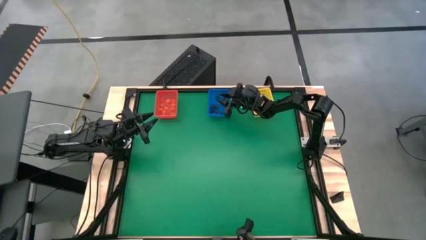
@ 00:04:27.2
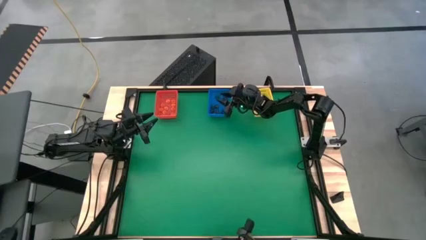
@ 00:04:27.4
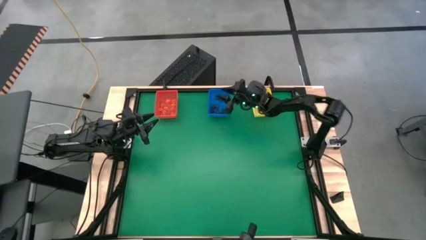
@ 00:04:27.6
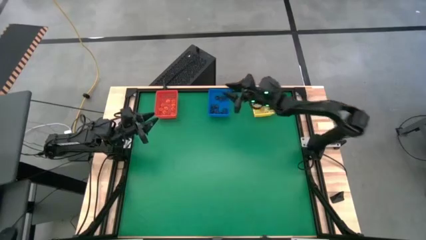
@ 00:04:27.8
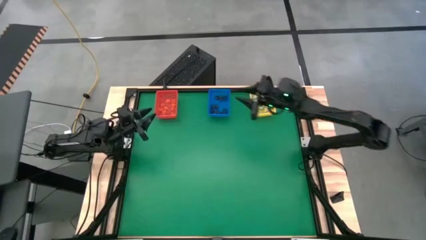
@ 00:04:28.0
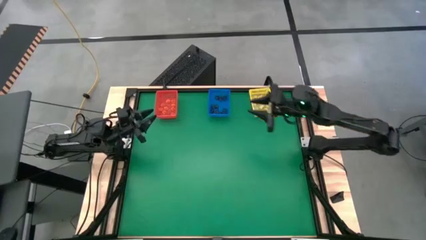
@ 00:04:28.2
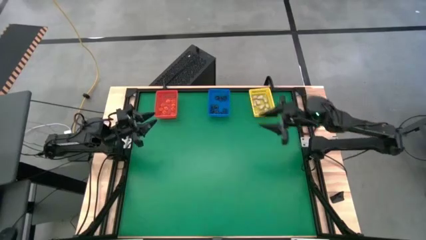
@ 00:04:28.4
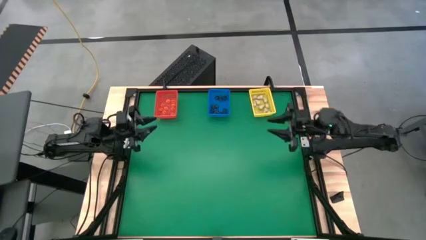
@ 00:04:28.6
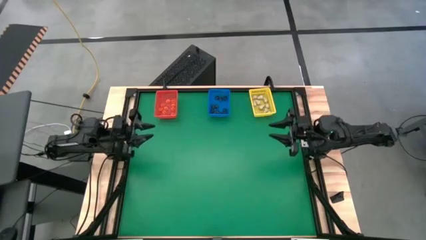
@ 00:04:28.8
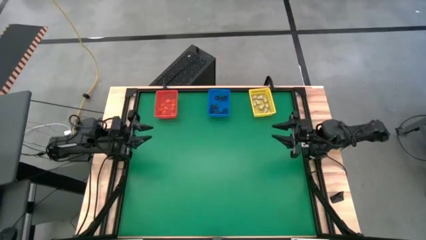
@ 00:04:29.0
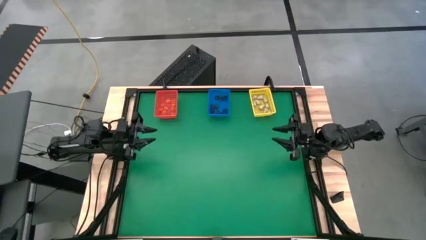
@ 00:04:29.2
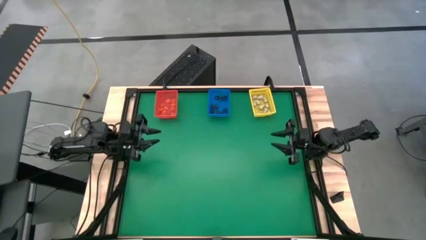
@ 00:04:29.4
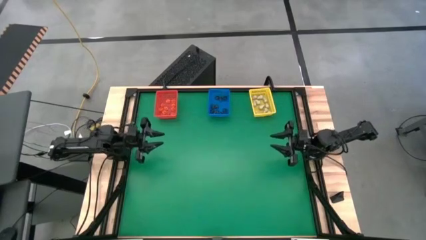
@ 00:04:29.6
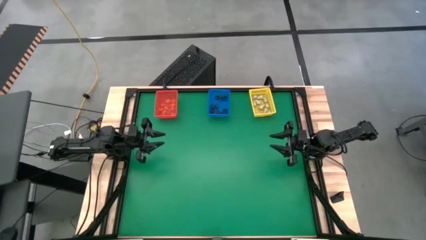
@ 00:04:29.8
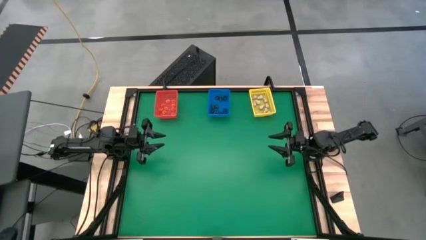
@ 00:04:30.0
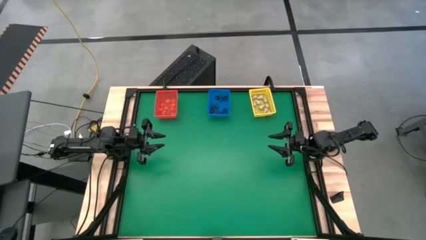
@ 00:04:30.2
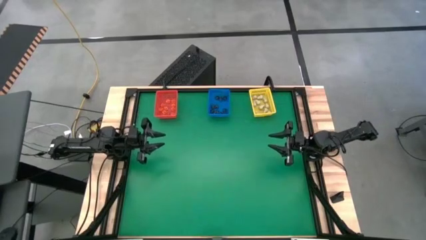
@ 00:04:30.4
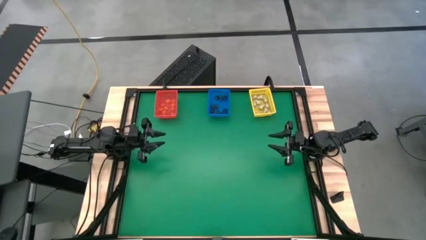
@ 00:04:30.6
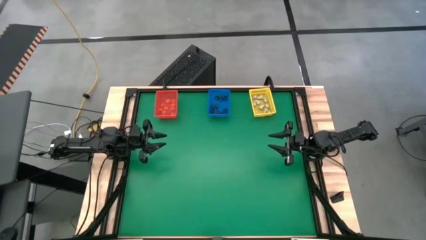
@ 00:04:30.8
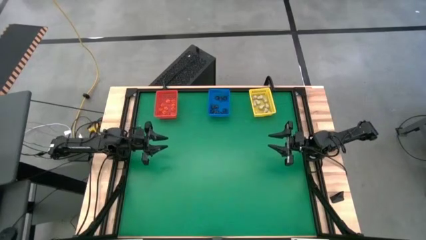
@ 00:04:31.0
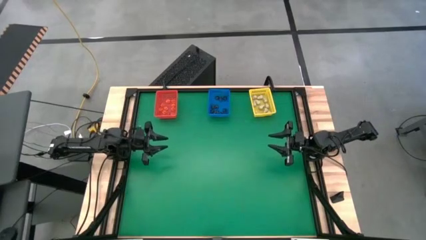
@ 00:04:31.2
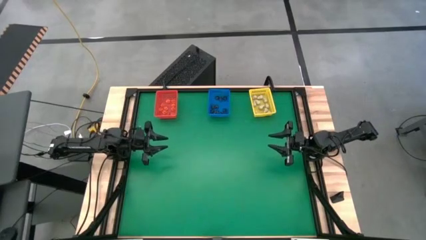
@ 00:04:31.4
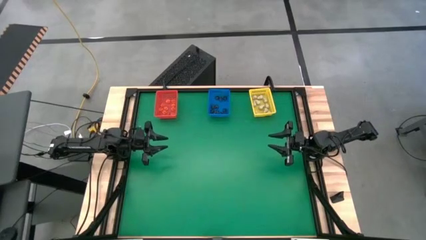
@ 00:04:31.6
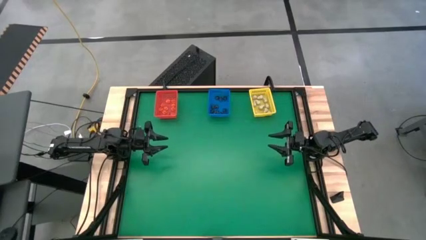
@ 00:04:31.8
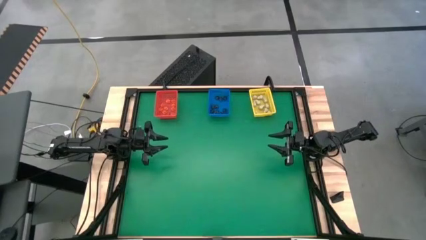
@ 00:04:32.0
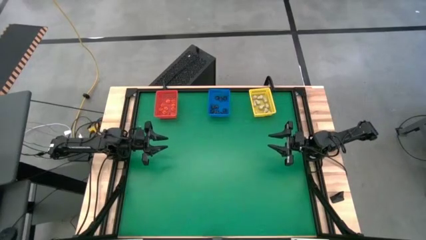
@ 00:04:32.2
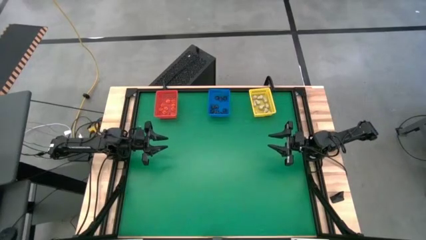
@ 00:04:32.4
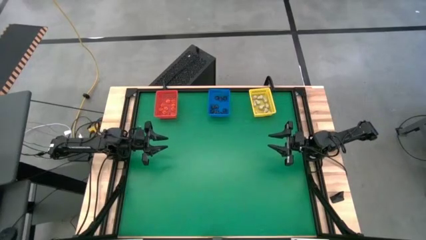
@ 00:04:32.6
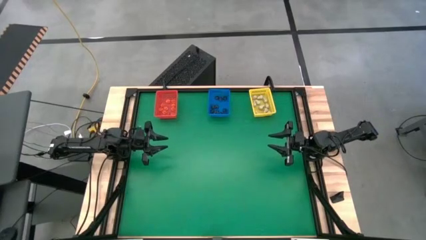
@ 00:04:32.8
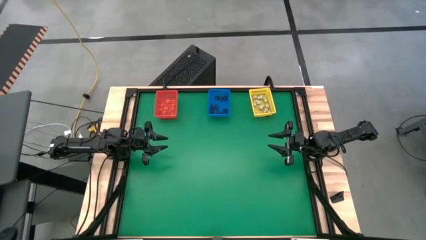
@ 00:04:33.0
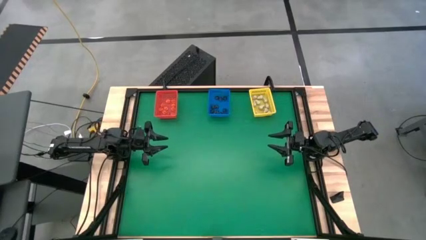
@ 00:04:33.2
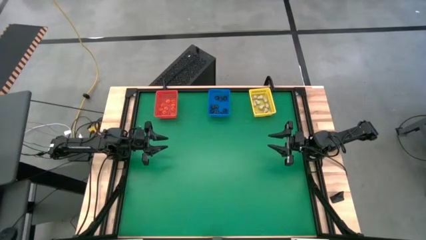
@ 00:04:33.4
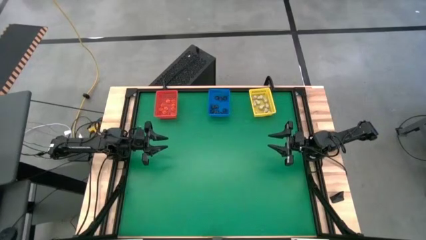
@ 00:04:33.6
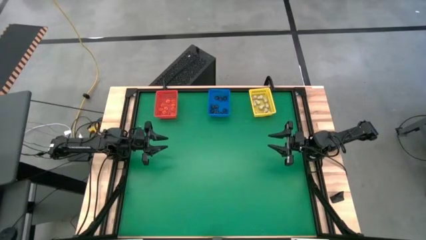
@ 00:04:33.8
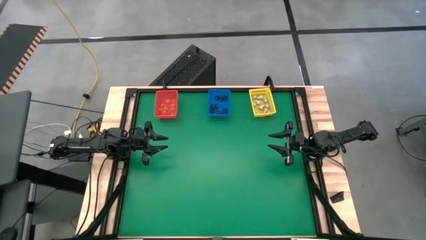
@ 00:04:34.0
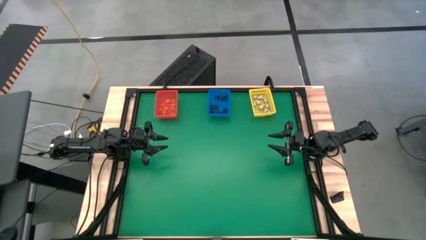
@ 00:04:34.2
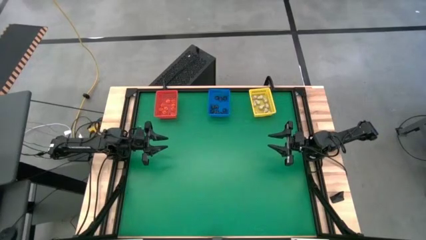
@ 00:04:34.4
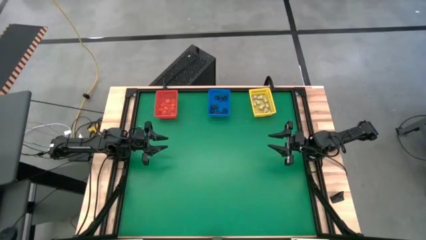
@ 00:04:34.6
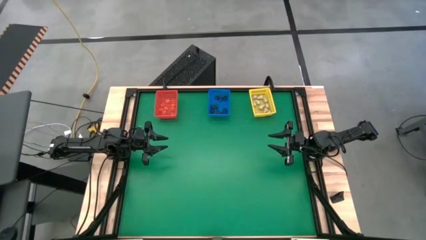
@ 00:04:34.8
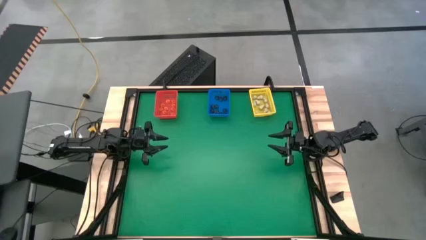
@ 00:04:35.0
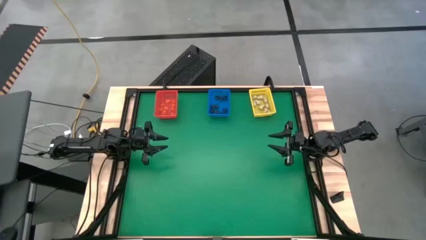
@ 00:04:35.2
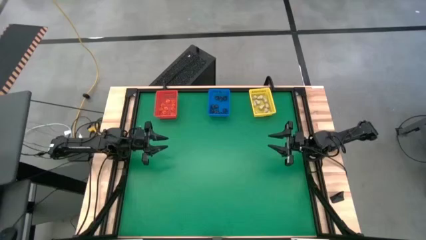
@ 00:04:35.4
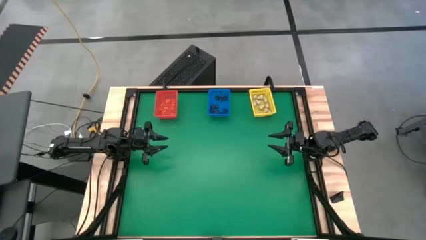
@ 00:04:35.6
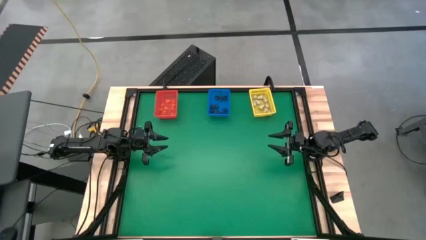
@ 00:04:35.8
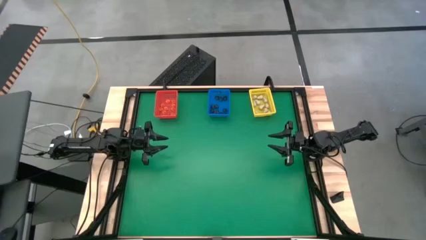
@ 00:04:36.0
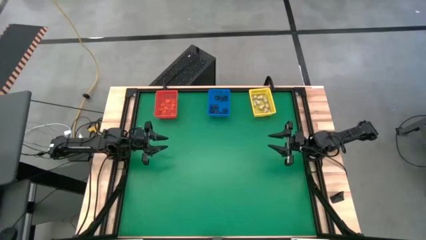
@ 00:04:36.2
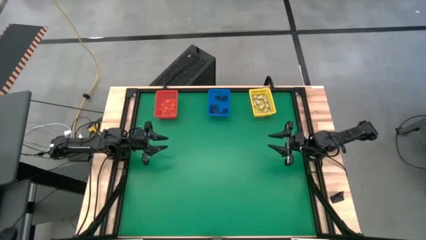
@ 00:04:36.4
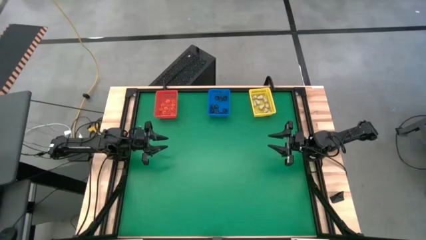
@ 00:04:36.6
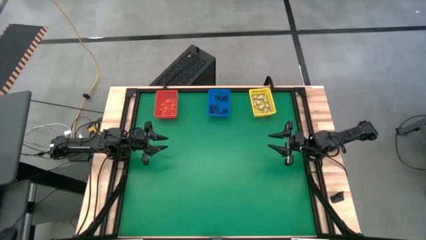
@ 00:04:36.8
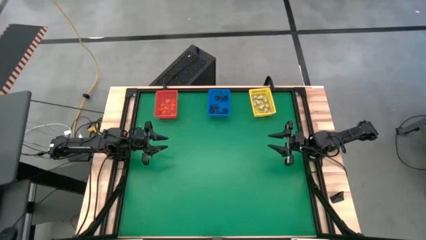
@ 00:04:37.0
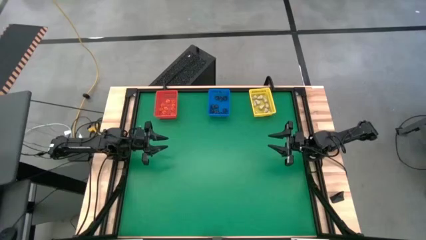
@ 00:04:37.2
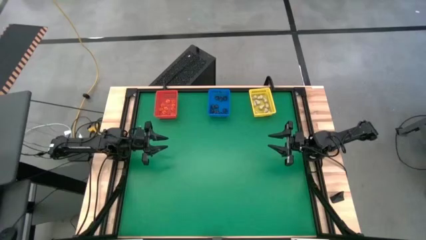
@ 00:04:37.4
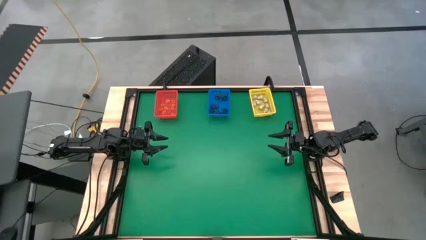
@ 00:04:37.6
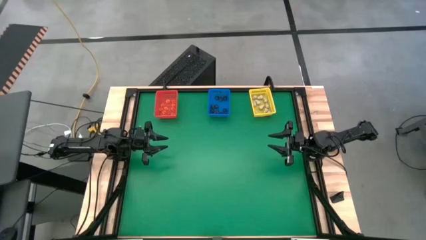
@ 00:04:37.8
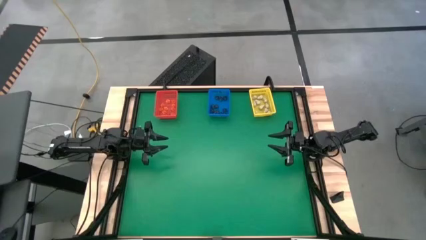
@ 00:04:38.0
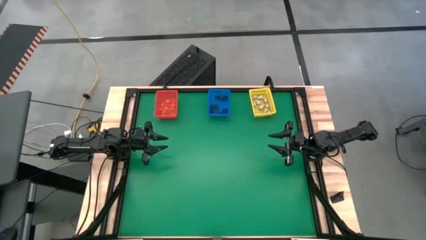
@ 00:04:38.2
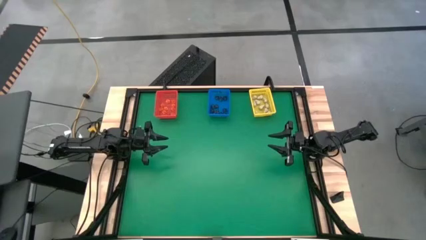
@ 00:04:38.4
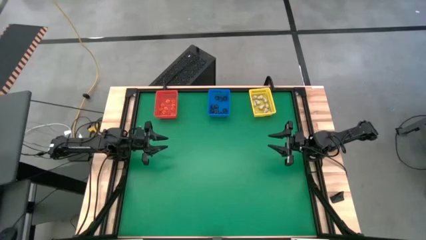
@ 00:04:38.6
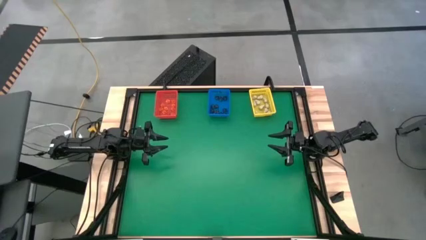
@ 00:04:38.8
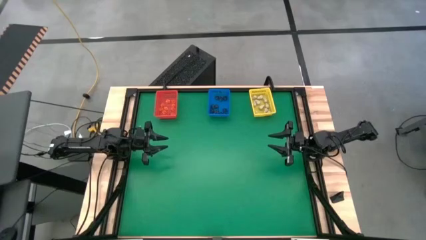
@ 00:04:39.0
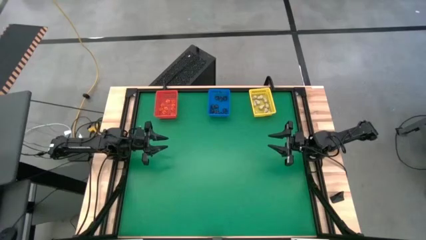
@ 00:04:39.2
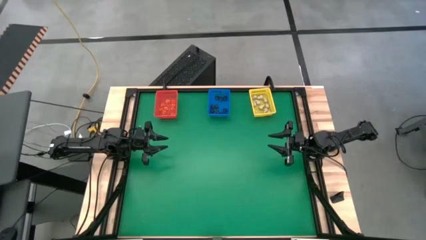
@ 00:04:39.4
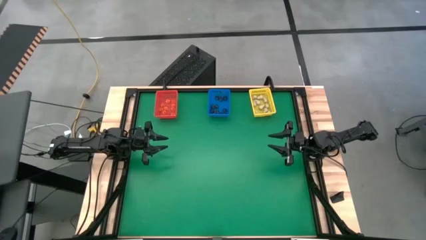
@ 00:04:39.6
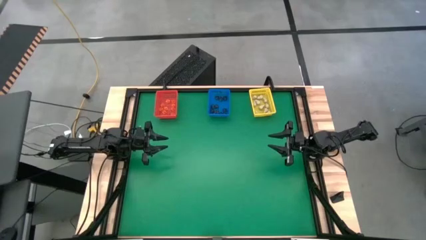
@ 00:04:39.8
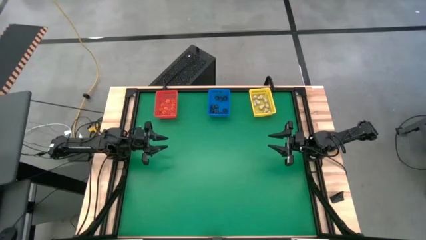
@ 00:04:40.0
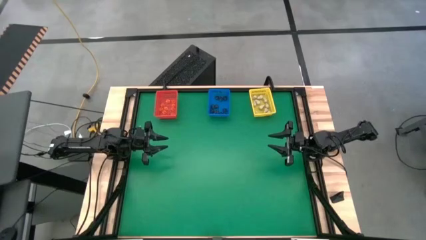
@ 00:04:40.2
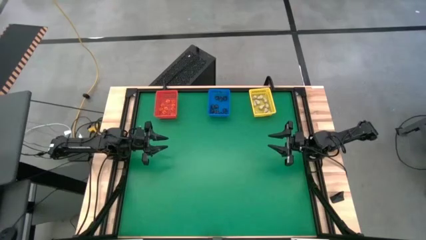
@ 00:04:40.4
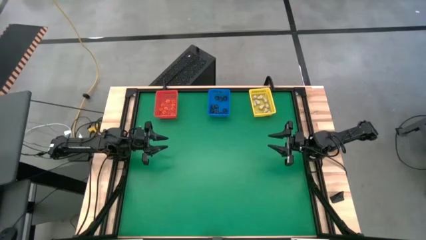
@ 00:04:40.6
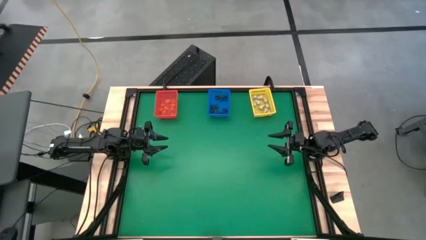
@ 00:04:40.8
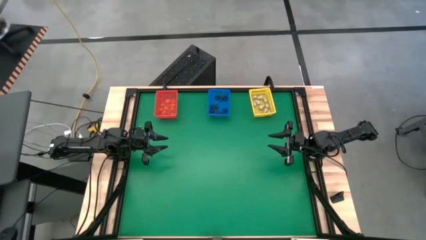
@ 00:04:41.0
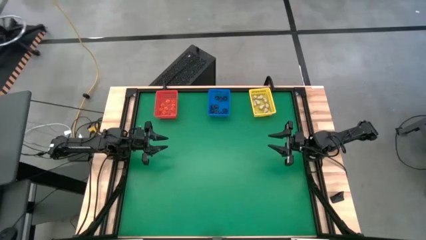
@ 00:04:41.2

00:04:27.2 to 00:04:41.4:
Task: Sort Halloween decoration
Return to Home Position
